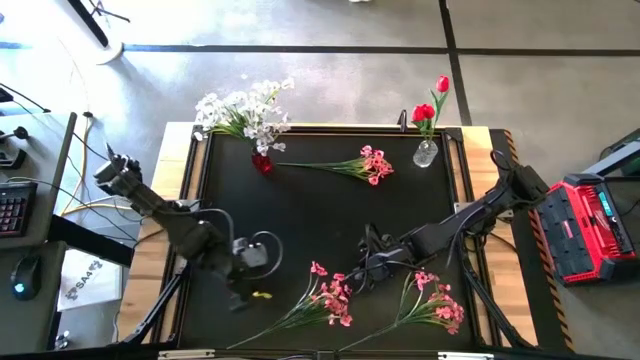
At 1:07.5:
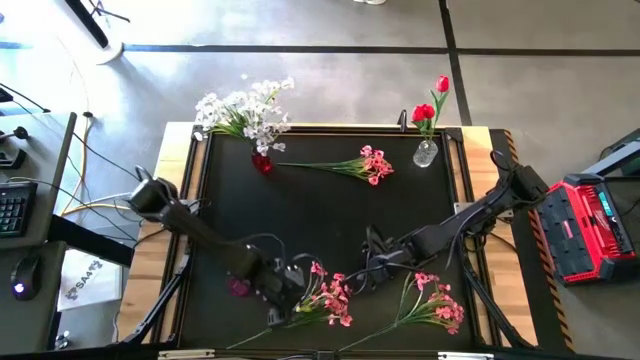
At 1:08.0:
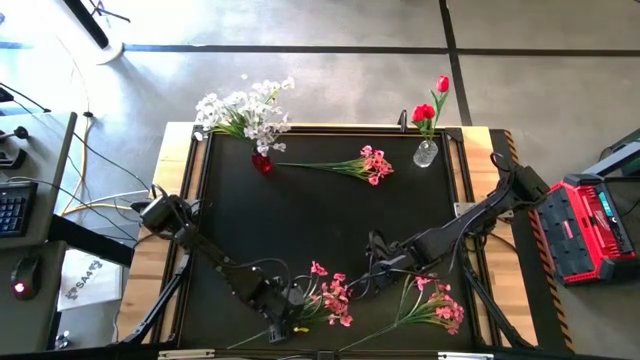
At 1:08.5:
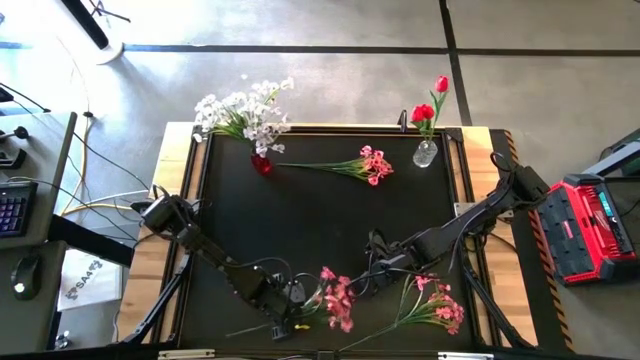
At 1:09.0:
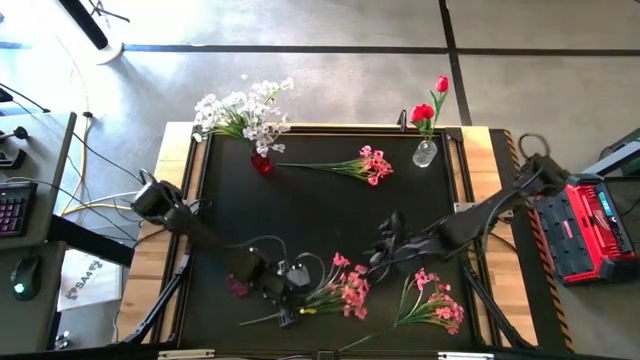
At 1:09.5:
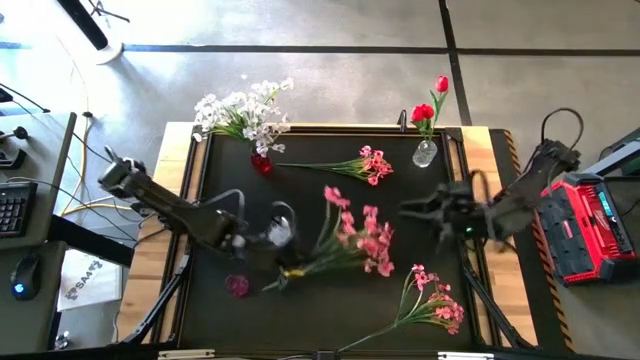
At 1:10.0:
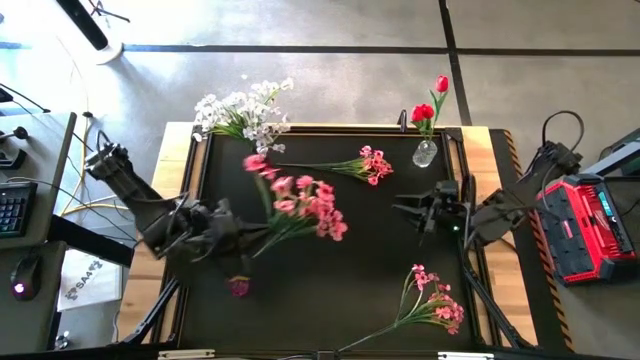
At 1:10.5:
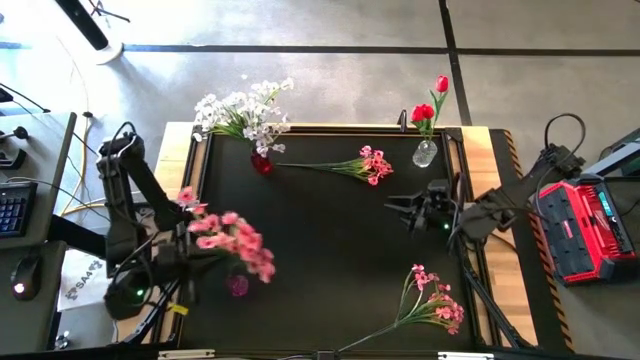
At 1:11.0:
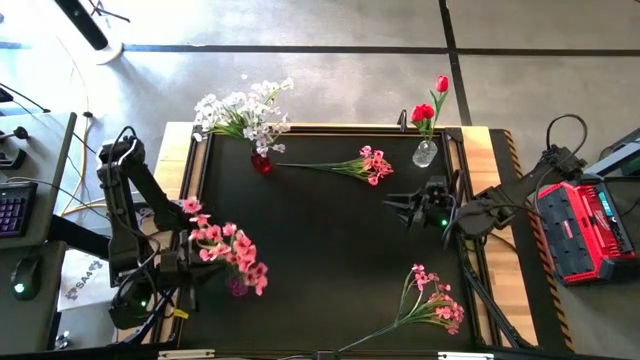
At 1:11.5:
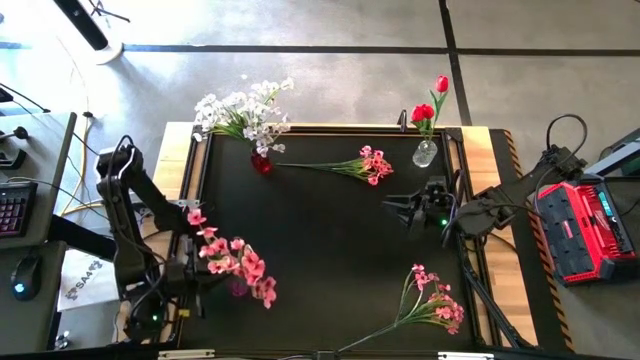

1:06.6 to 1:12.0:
Task: Sort flowers into vase by color
Put the bottom left pink flowers into the violet vase

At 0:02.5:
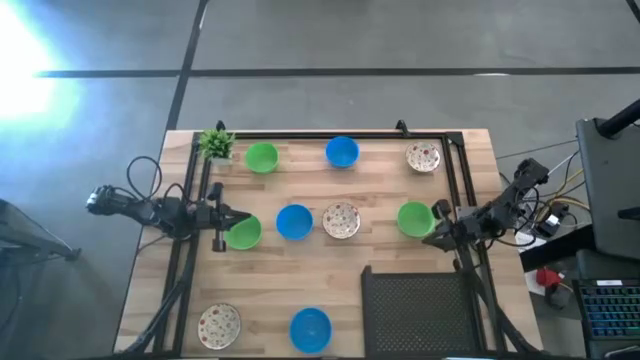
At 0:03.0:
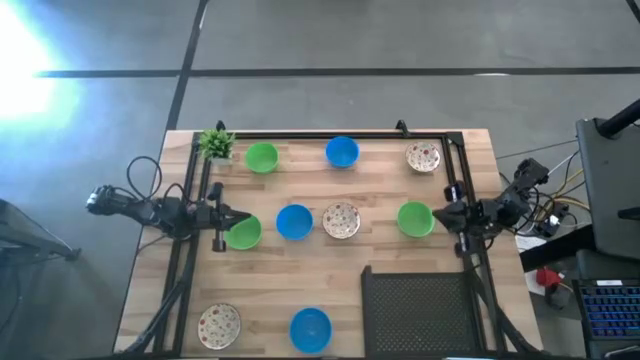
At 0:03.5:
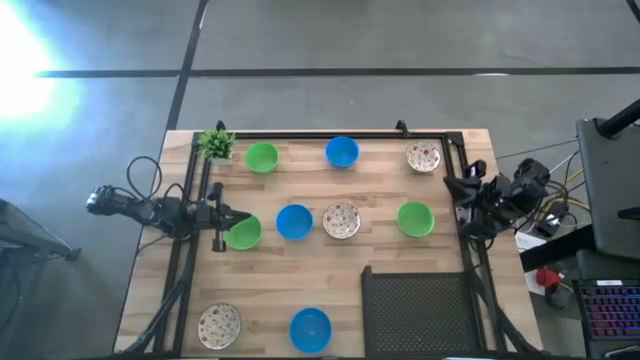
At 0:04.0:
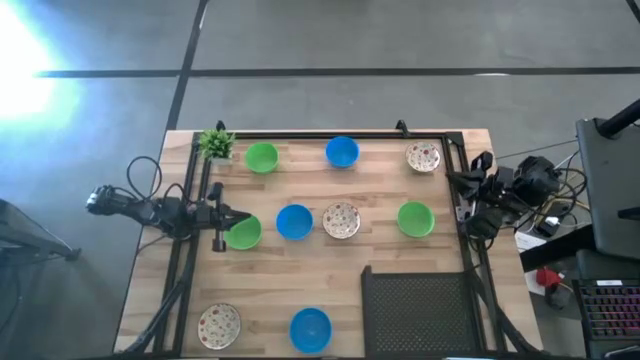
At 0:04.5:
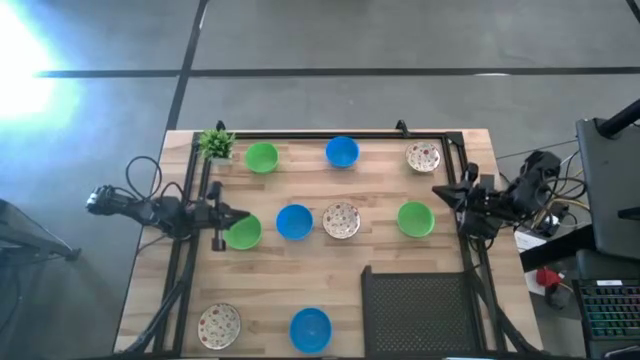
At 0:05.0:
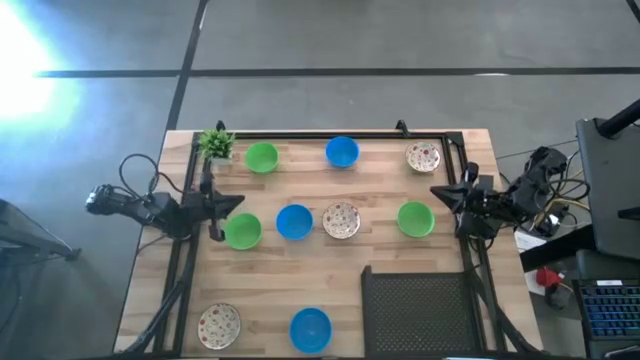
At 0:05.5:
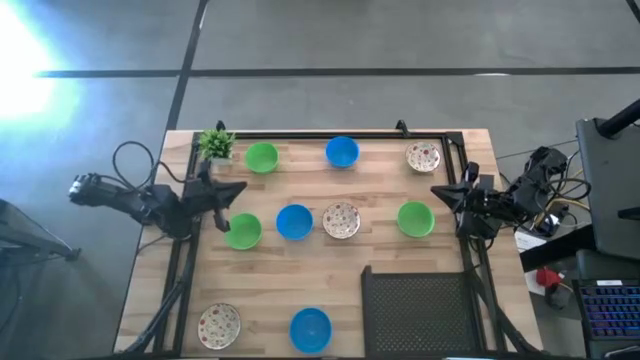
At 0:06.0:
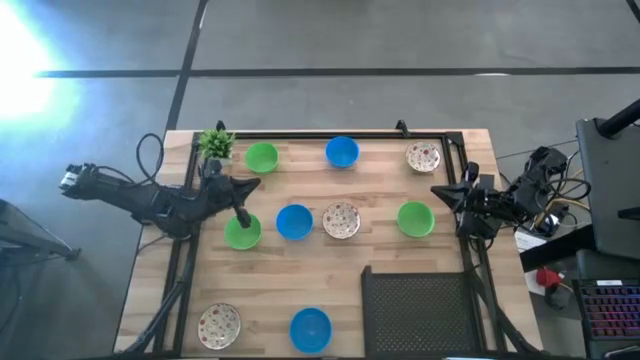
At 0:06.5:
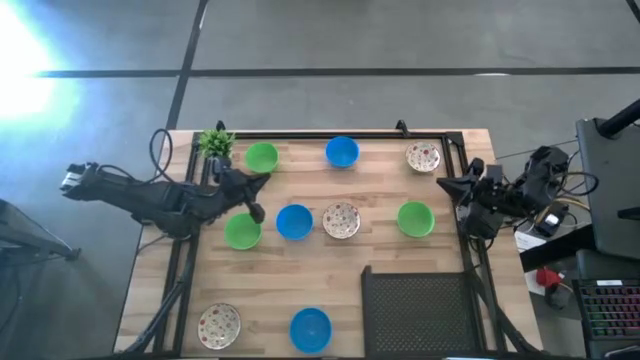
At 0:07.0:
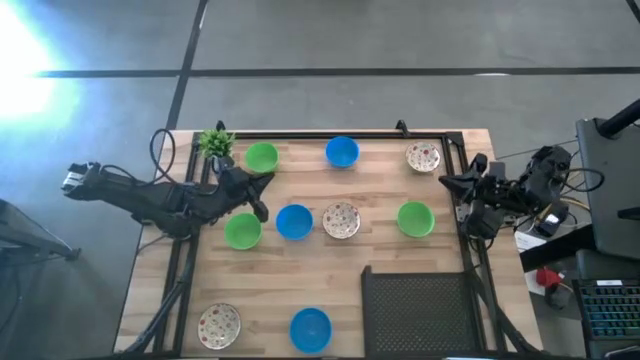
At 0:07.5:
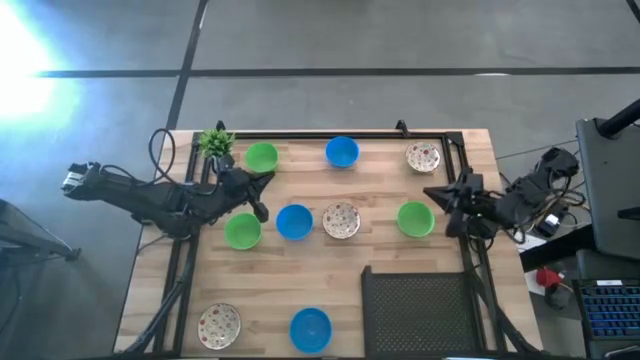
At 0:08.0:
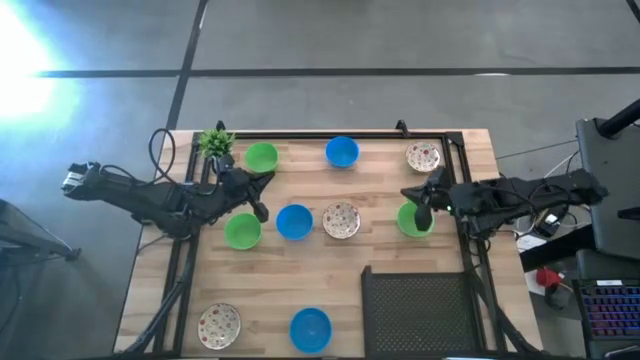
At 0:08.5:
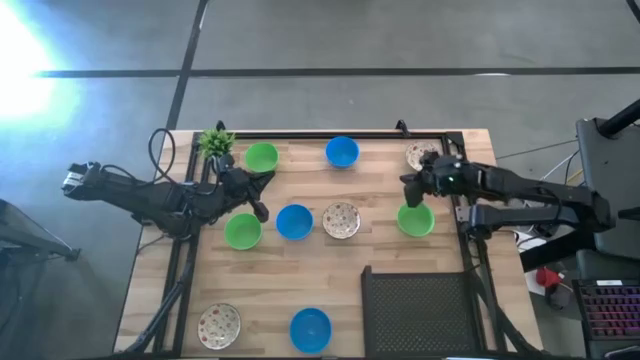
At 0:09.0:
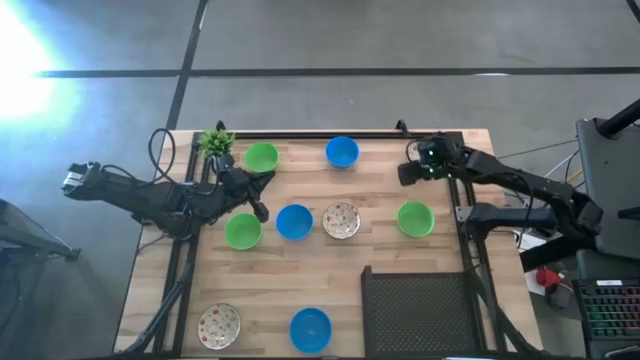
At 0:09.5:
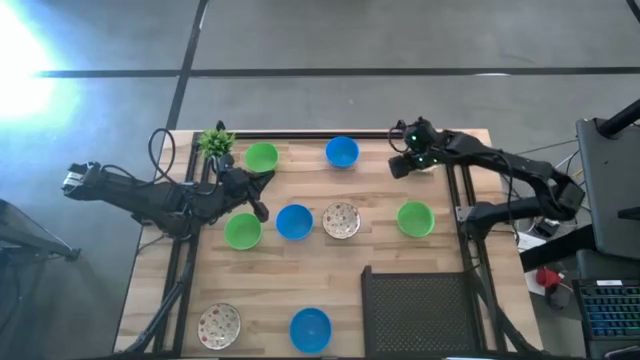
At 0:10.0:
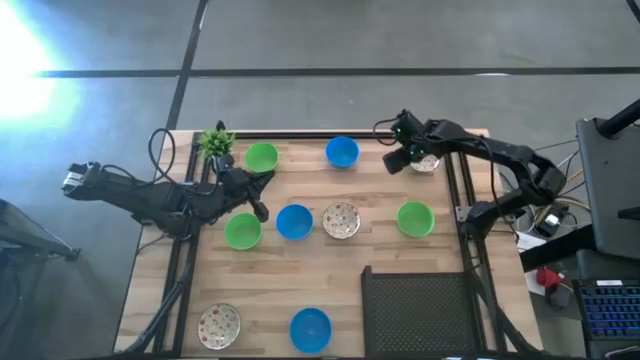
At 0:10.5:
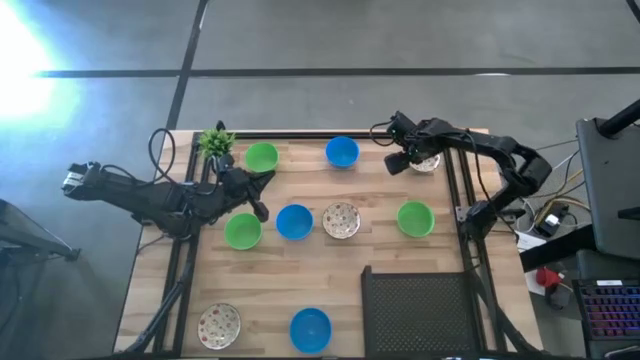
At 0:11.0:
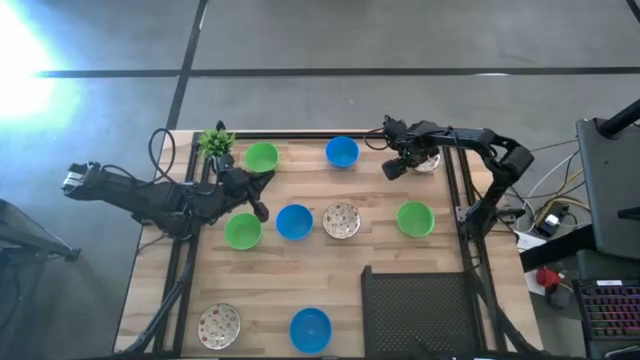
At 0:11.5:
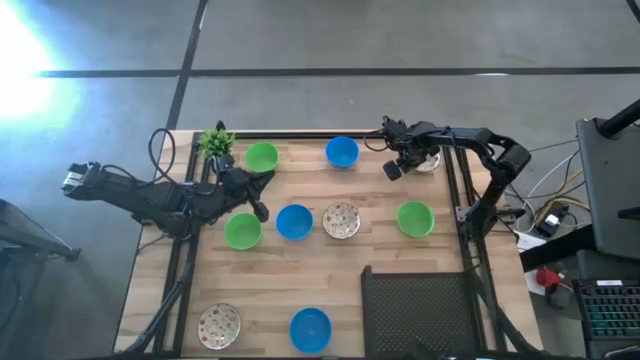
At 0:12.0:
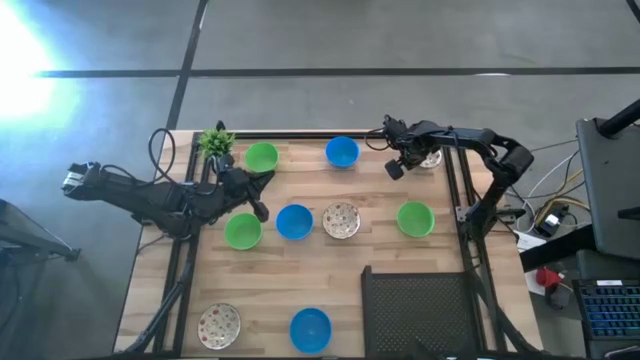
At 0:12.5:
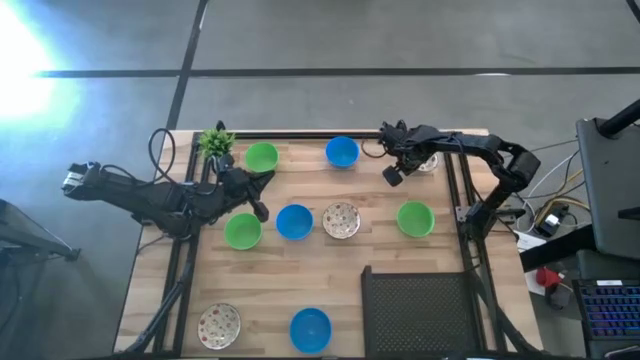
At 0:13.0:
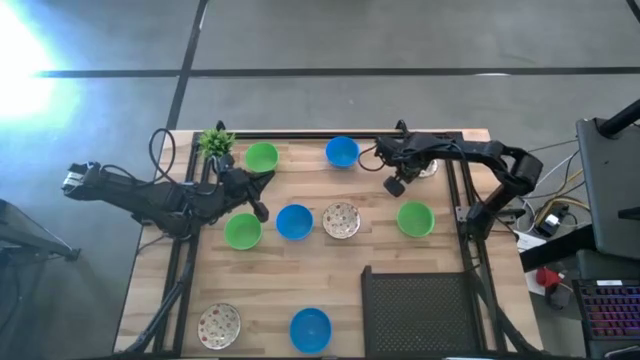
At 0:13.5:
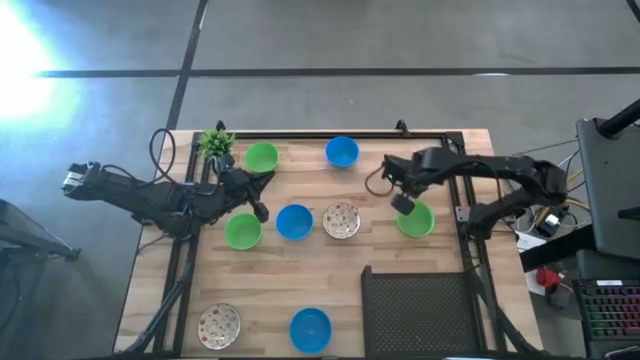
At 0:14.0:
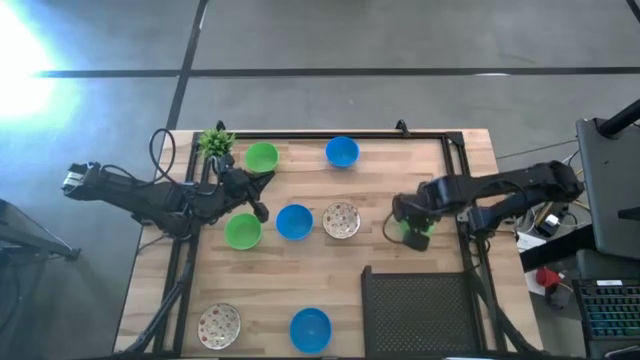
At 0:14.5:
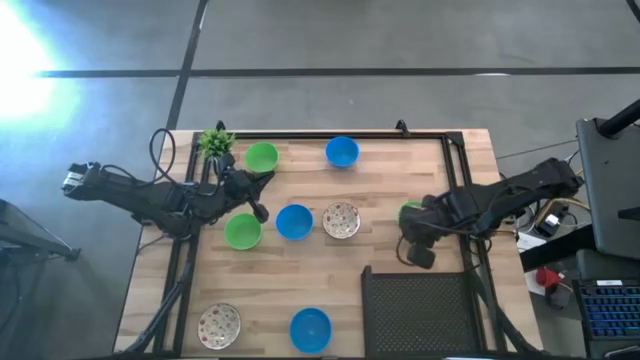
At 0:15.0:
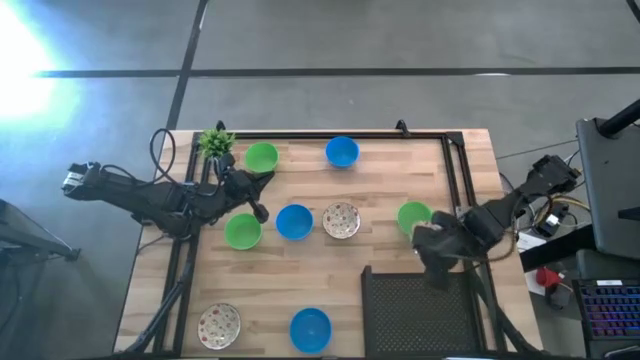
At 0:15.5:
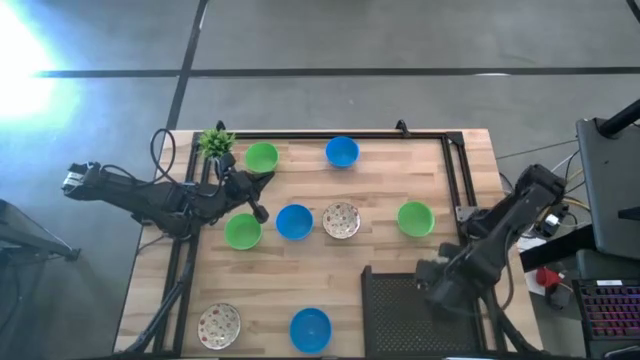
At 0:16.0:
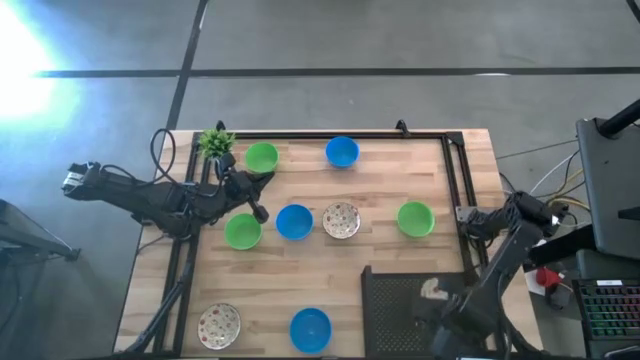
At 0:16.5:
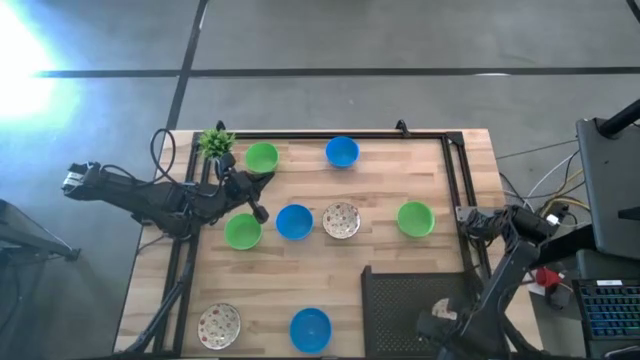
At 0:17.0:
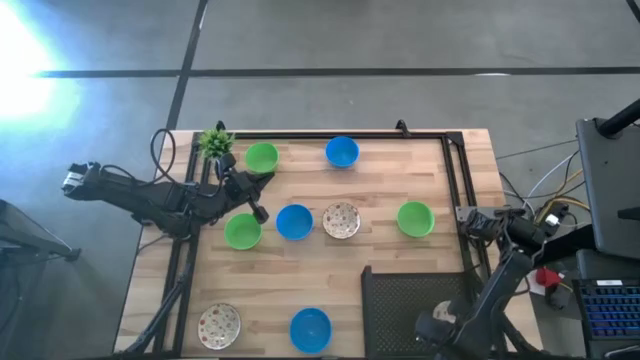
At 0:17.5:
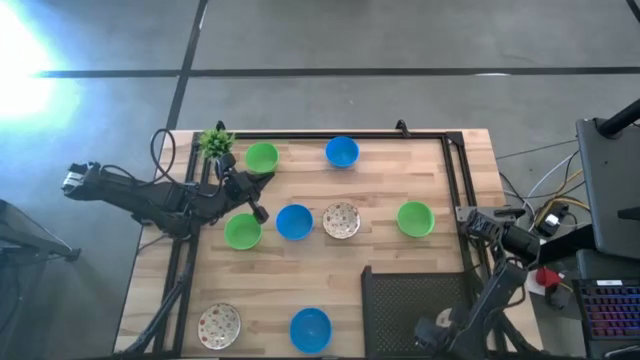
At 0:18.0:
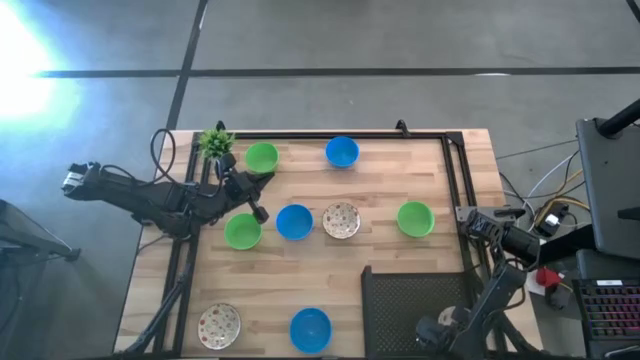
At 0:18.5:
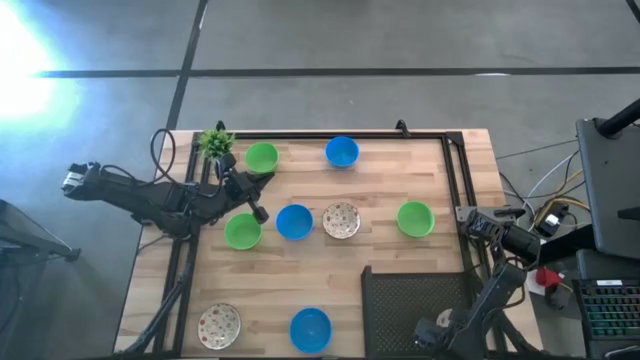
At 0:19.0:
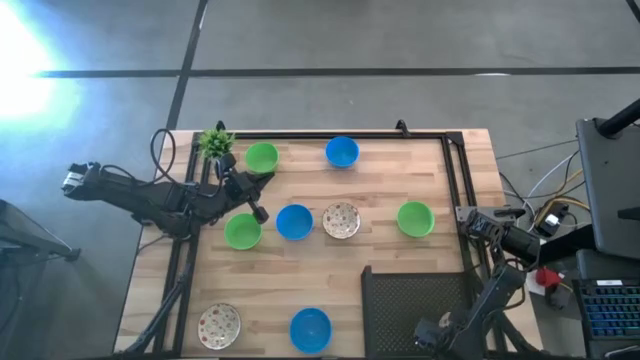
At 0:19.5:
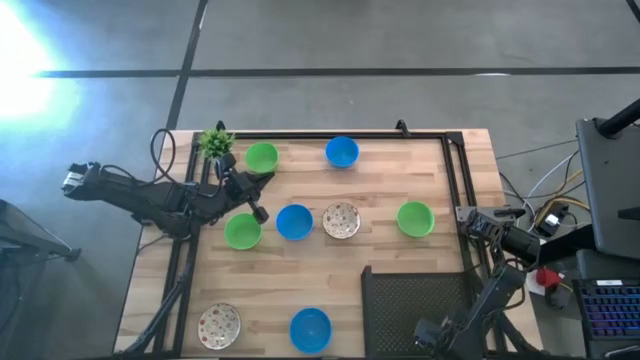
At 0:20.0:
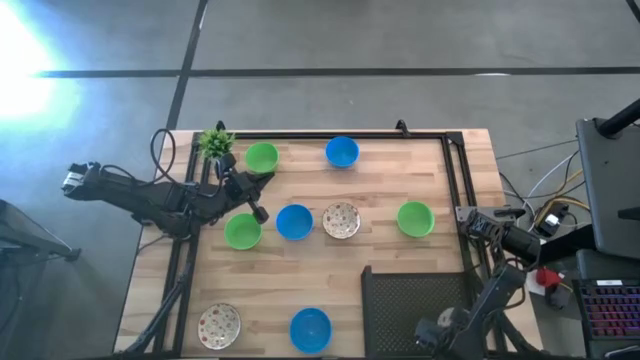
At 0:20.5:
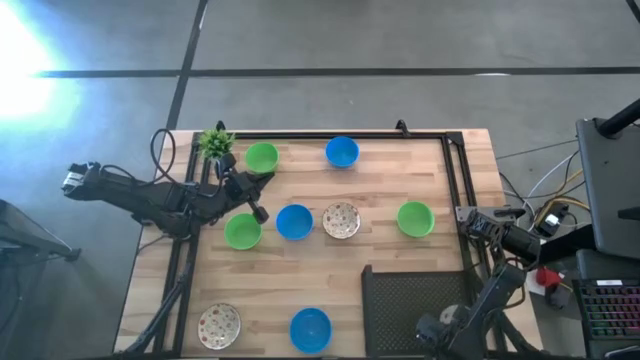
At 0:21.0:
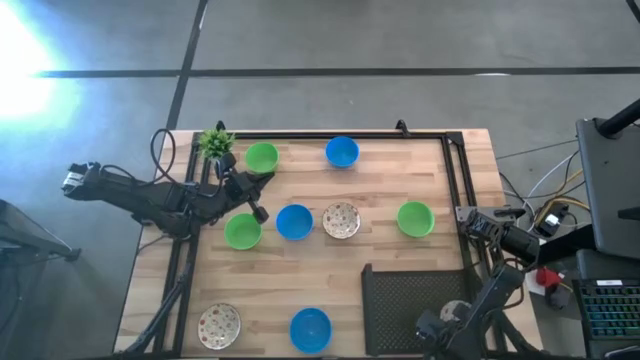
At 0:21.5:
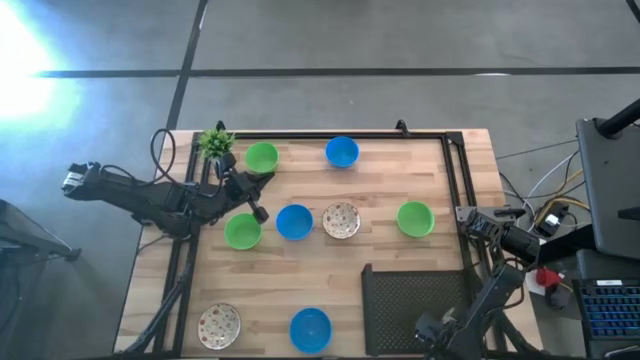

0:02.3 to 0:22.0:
Task: Pick & Place Mini bowls
Put the top white patterned bowl on the shelf
